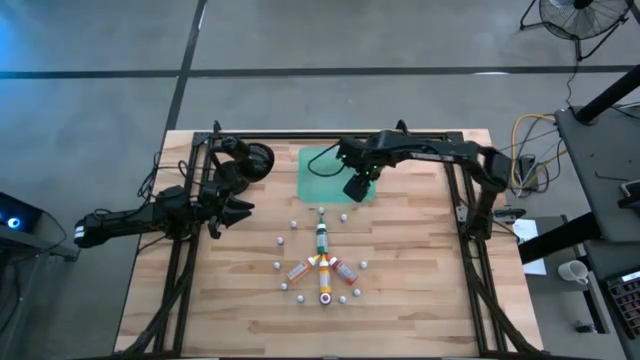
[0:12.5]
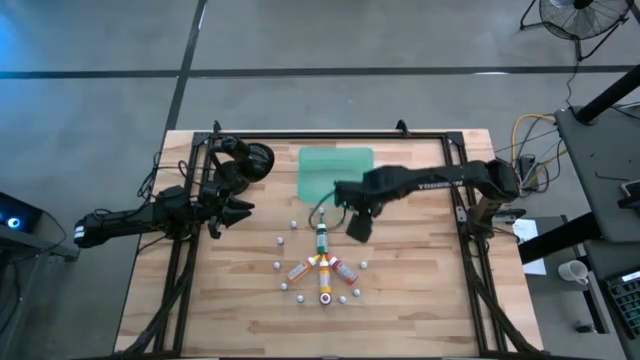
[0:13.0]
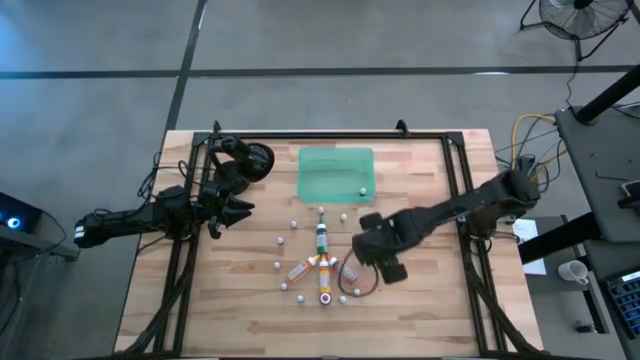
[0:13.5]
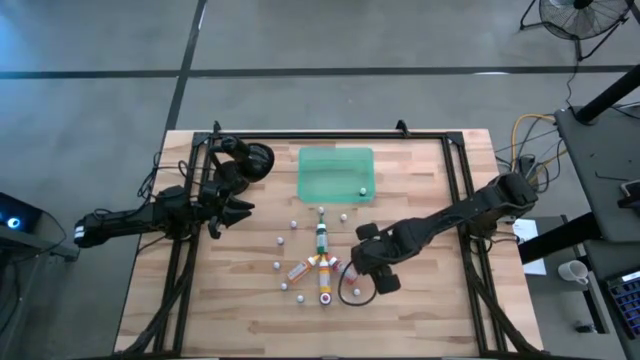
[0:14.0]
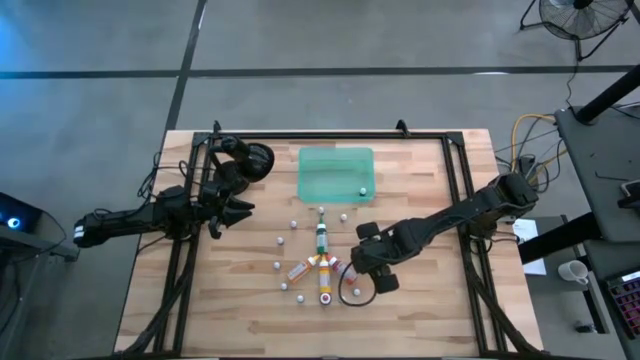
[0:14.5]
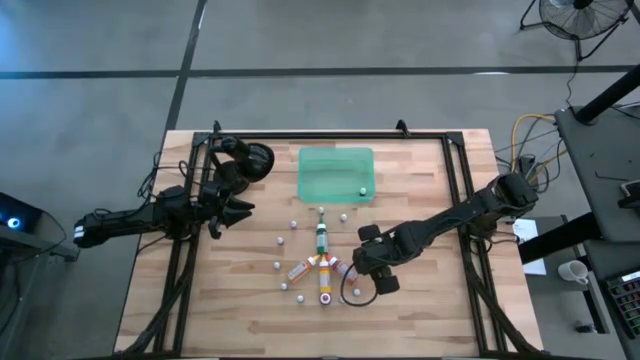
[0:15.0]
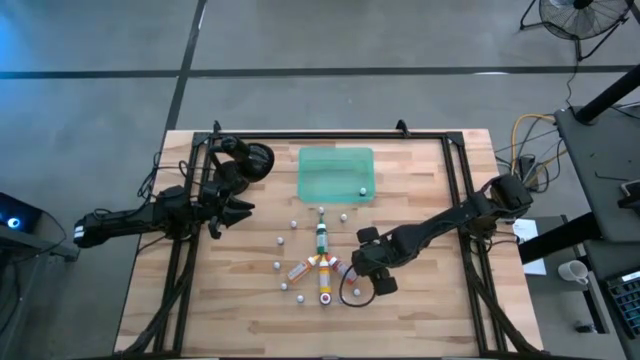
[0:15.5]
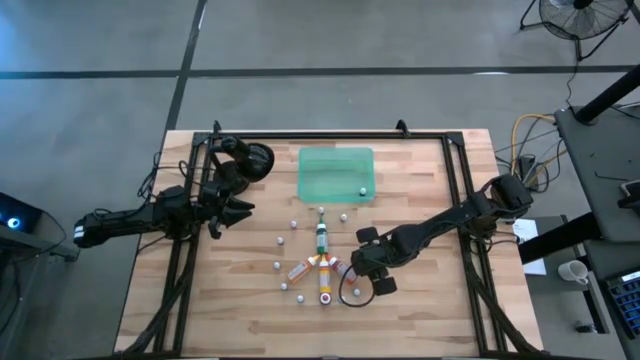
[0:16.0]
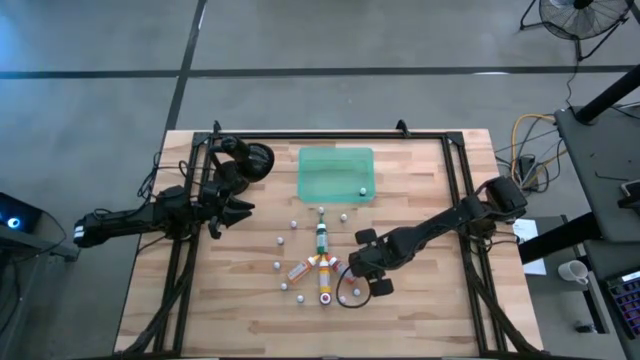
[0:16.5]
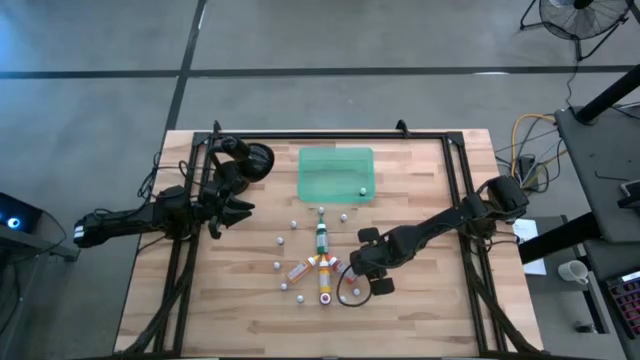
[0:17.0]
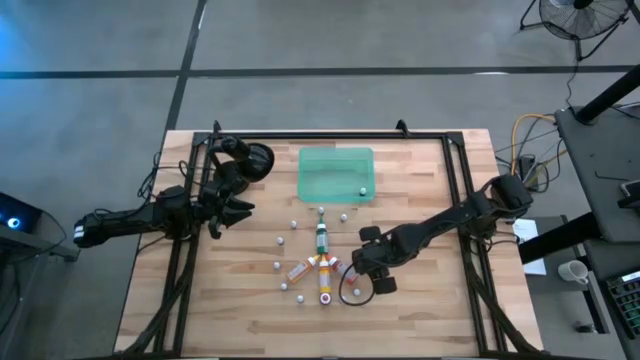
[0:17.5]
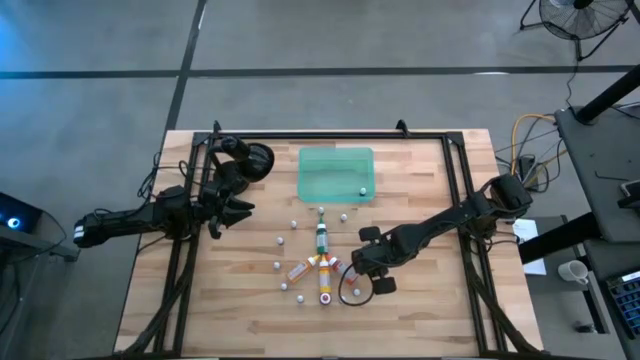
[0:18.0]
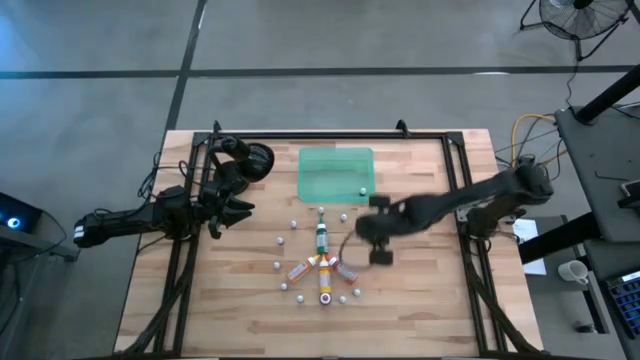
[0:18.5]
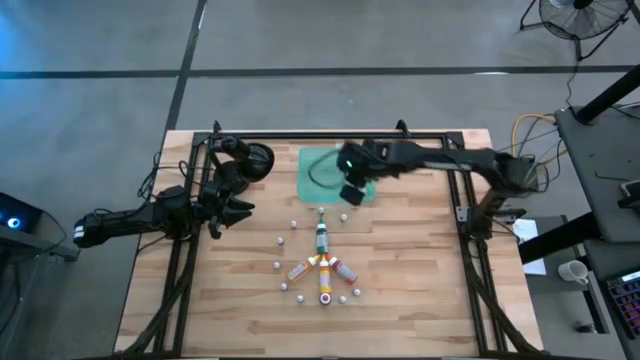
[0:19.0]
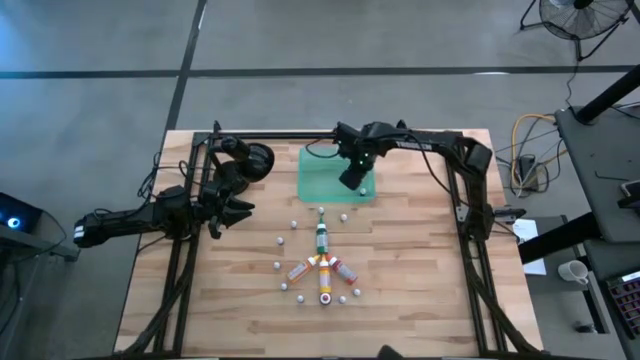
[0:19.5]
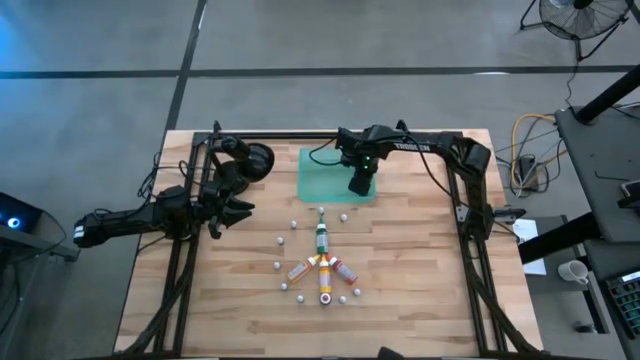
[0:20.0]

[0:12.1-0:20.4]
Task: Pick & Place food coloring
Put the small purple food coloring bottle into the bin

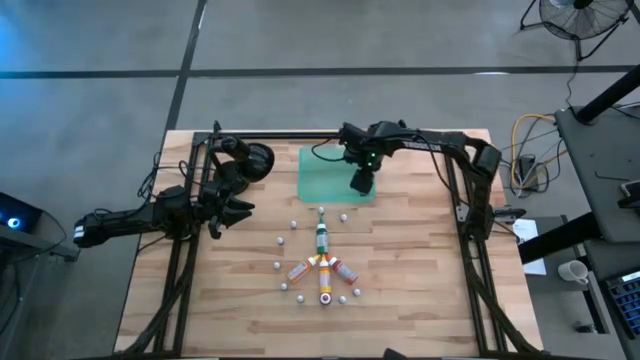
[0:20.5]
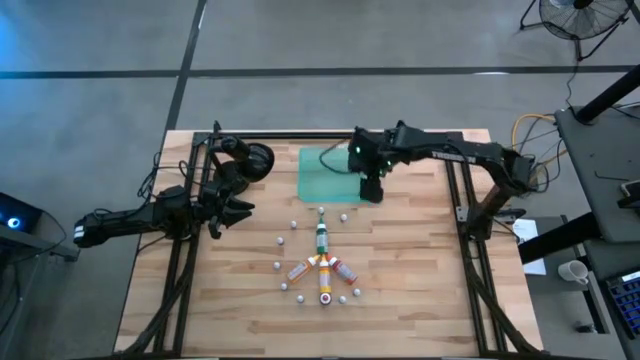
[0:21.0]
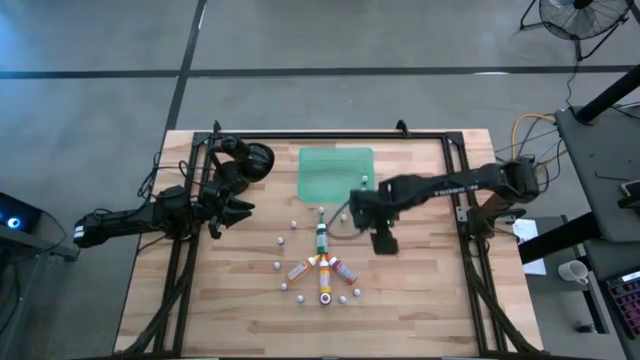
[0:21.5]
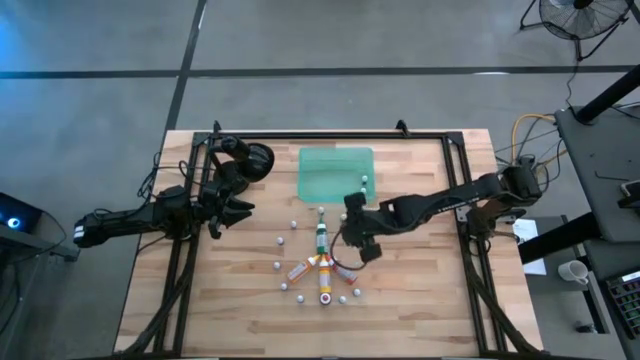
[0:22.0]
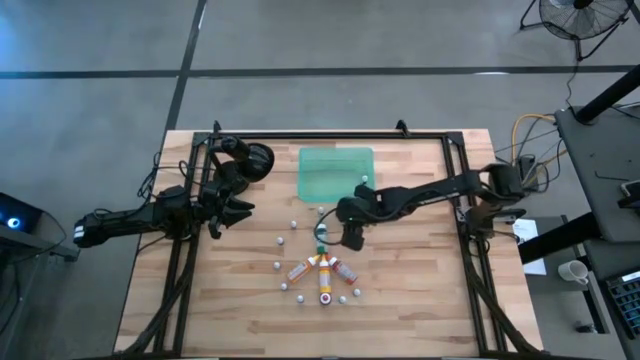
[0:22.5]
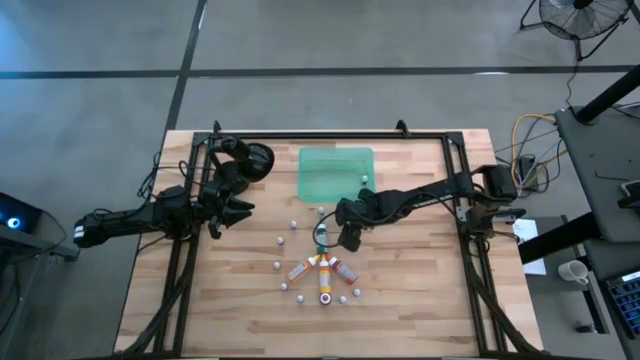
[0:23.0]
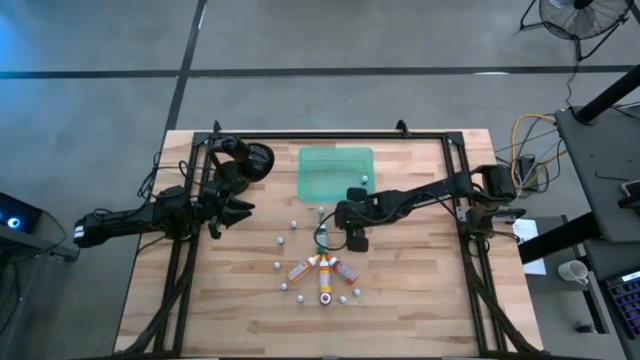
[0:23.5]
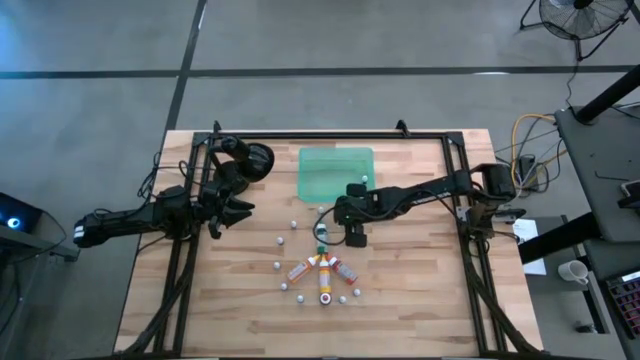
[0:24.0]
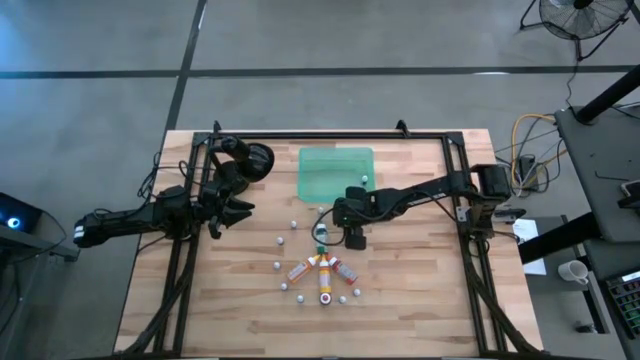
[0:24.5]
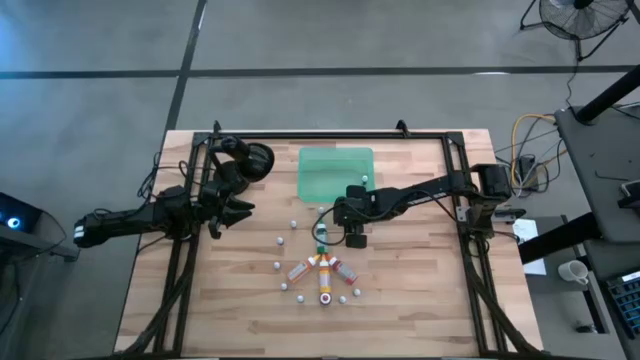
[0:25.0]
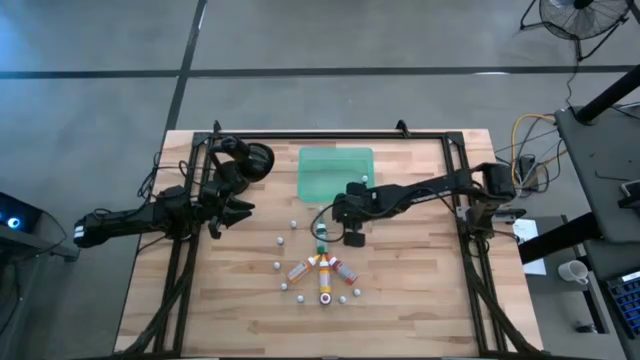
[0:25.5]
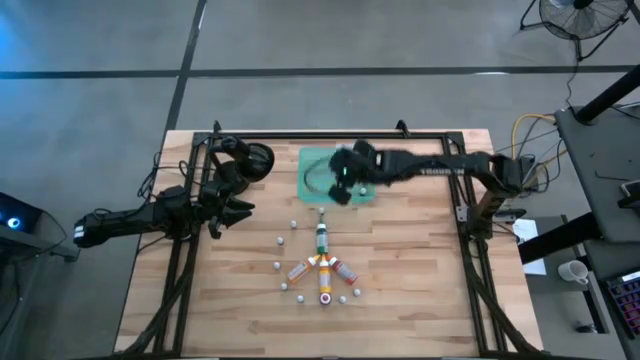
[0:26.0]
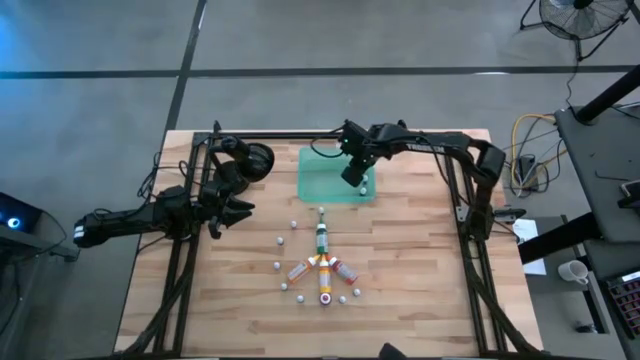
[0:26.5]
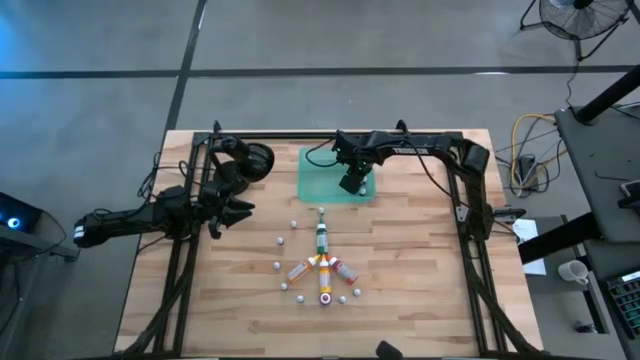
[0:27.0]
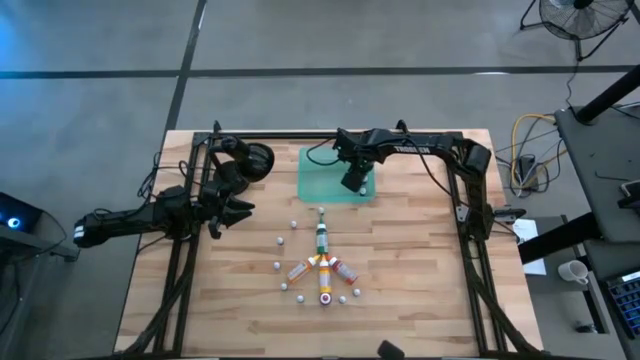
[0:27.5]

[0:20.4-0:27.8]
Put the small red food coloring bottle into the bin

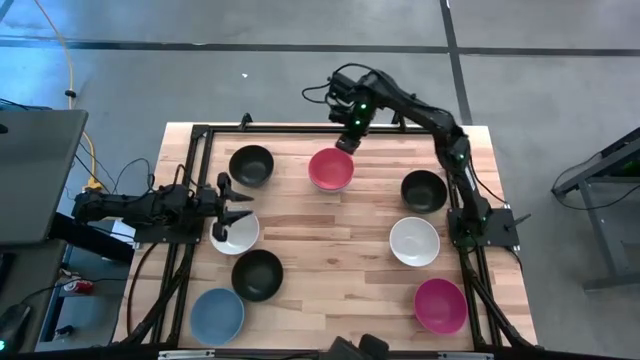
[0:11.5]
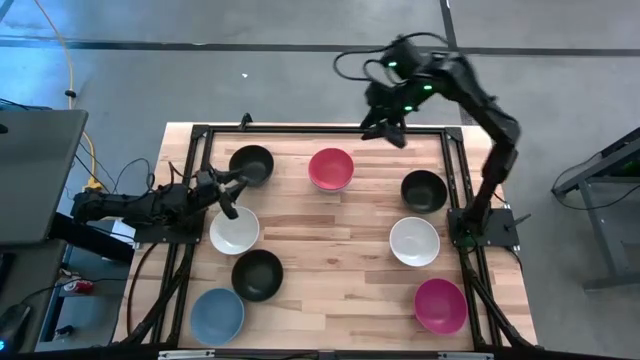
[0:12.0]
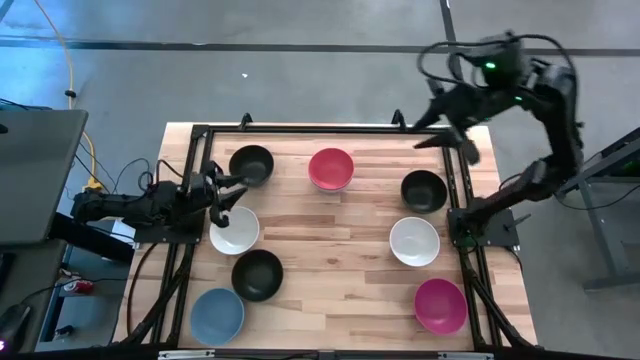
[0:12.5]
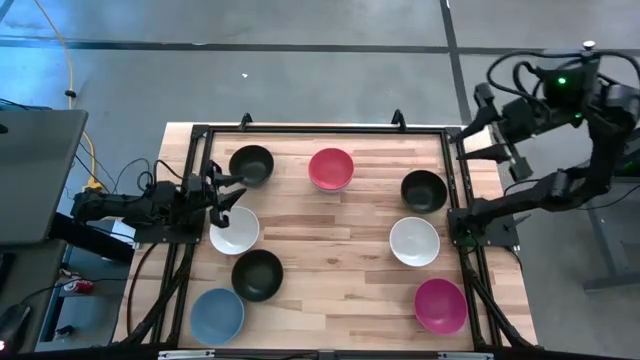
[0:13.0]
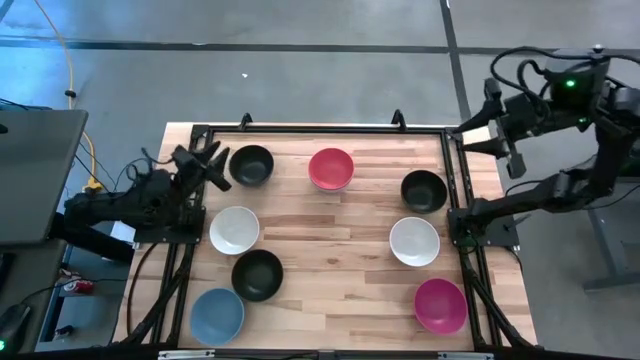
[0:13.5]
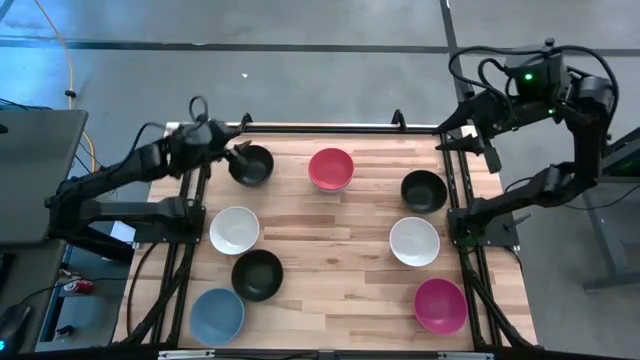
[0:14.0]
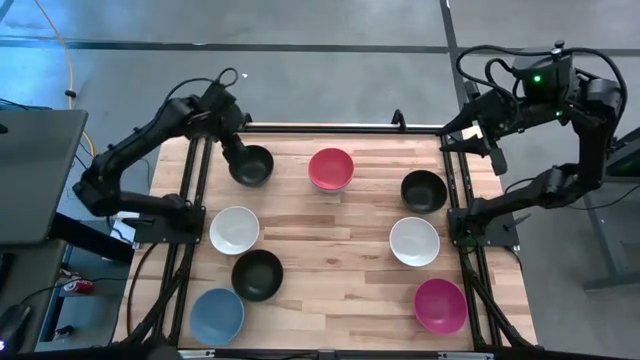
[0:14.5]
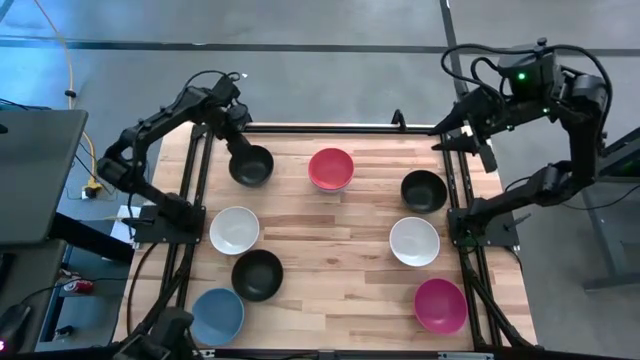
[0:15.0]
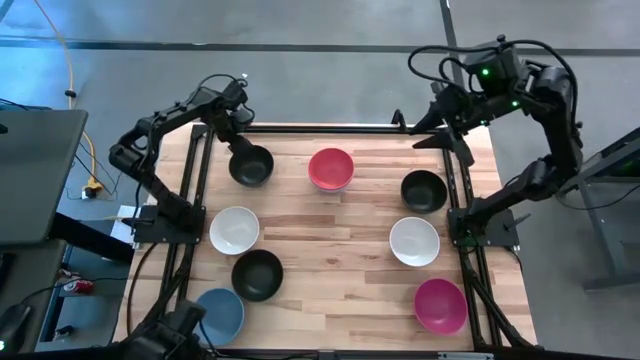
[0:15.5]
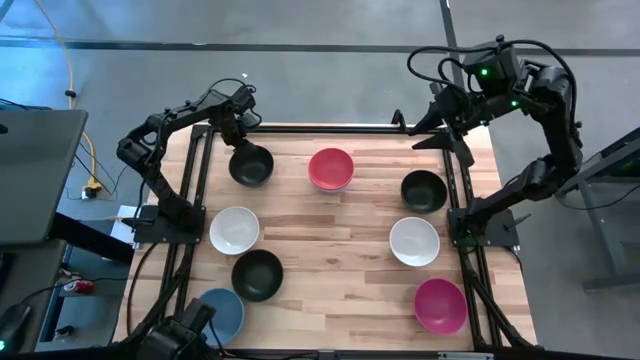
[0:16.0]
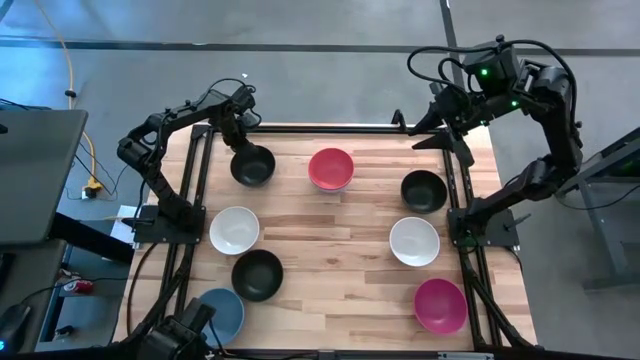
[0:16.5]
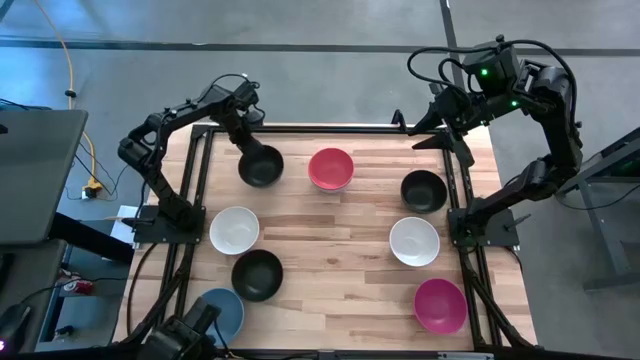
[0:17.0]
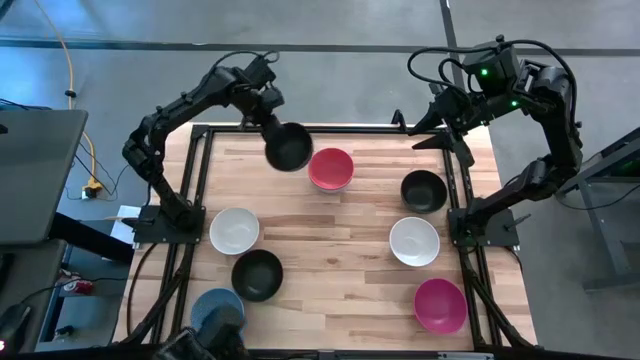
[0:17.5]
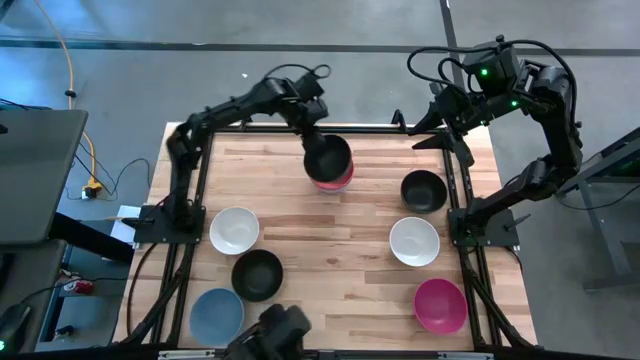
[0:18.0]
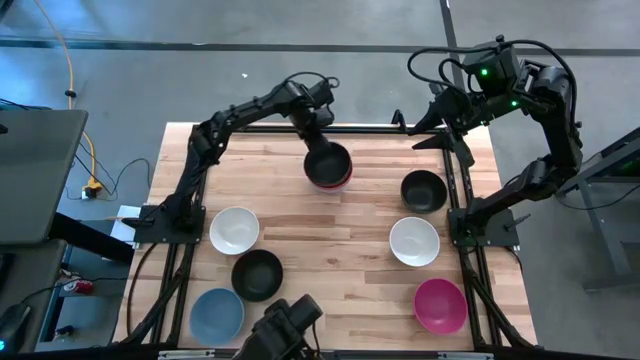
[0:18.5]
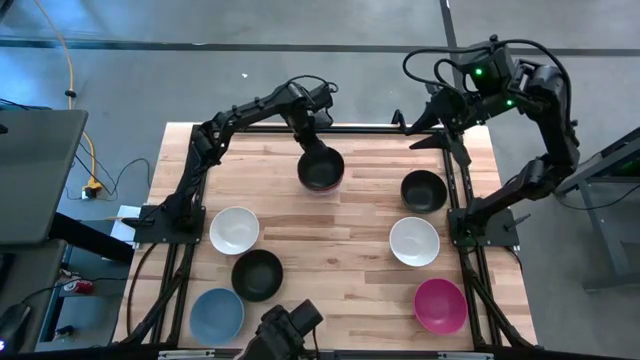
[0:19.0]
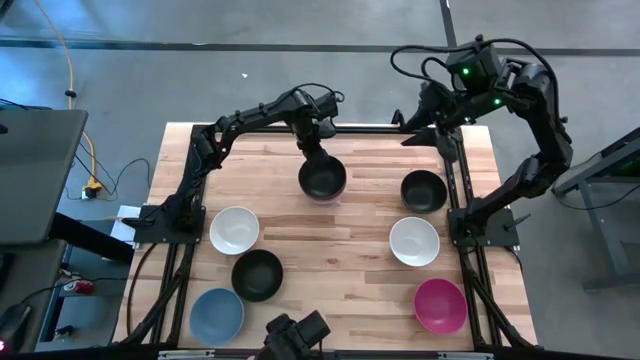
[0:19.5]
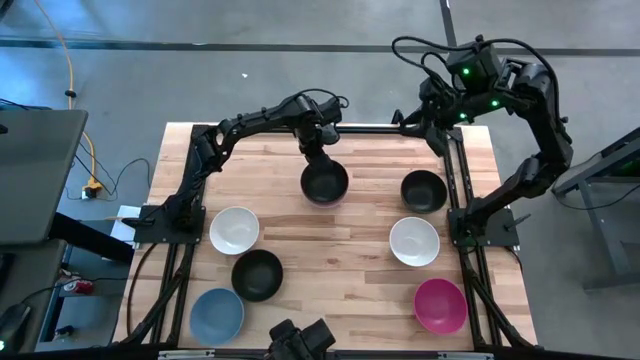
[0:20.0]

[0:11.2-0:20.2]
Task: Nest bowls inside each other
Stack the top left black bowl on top of the orange bowl
